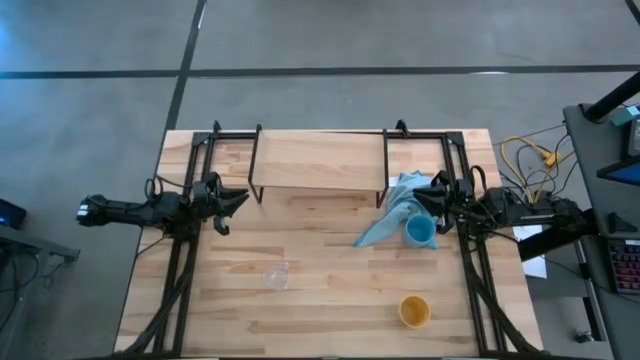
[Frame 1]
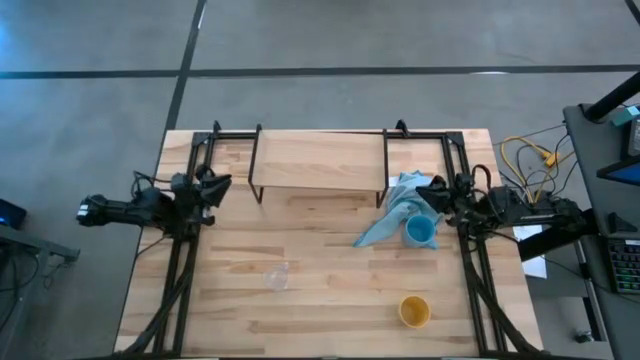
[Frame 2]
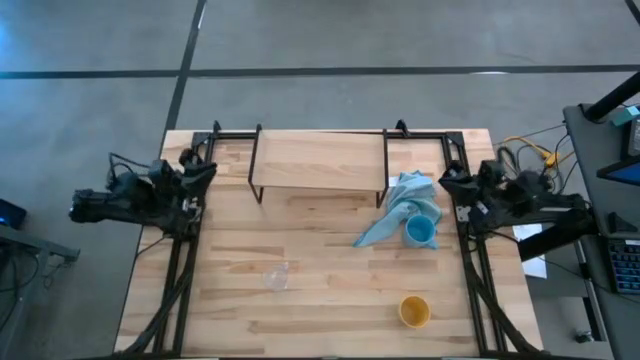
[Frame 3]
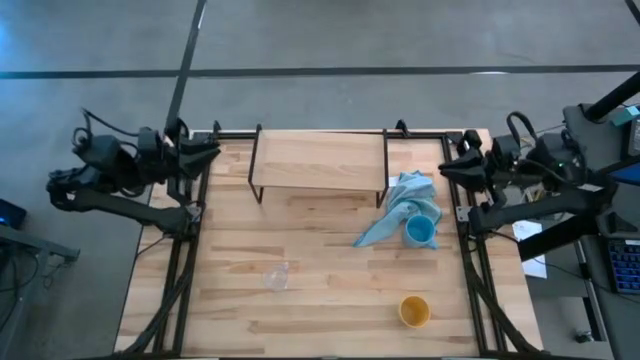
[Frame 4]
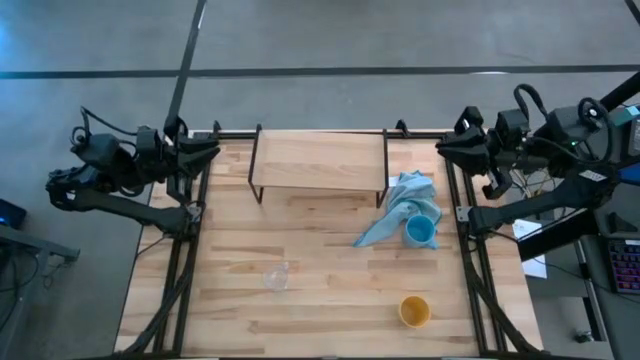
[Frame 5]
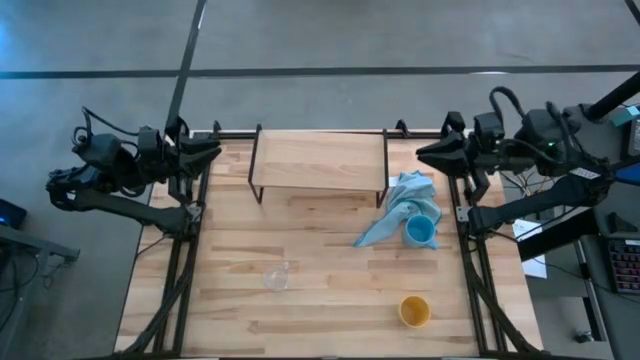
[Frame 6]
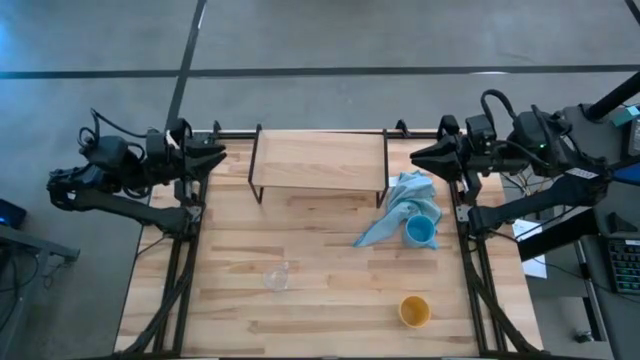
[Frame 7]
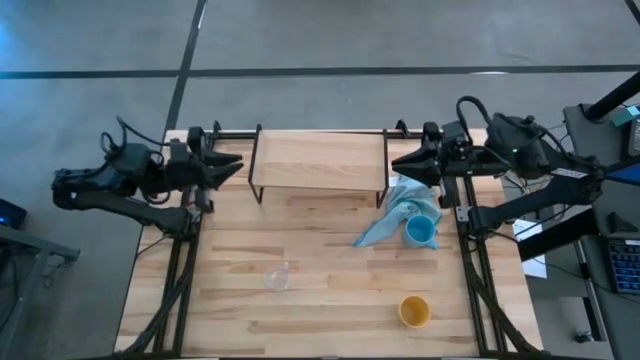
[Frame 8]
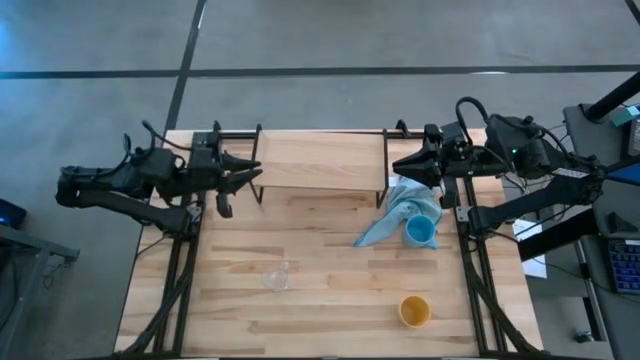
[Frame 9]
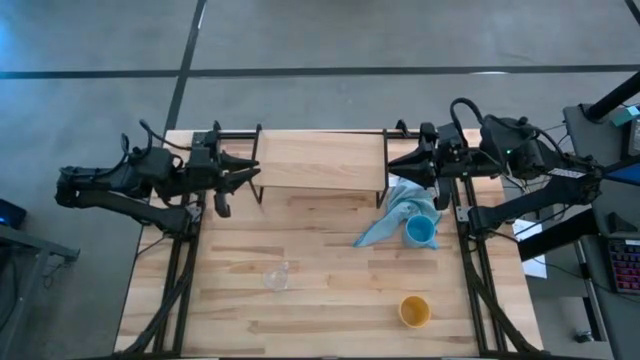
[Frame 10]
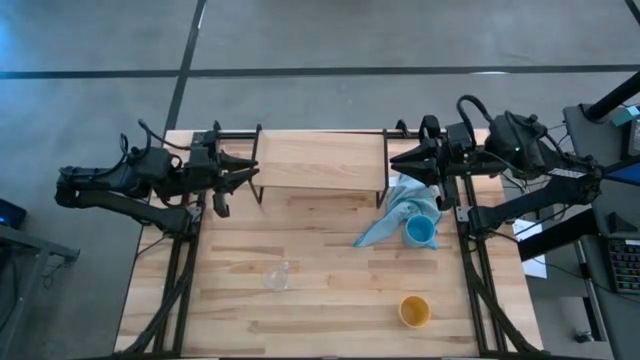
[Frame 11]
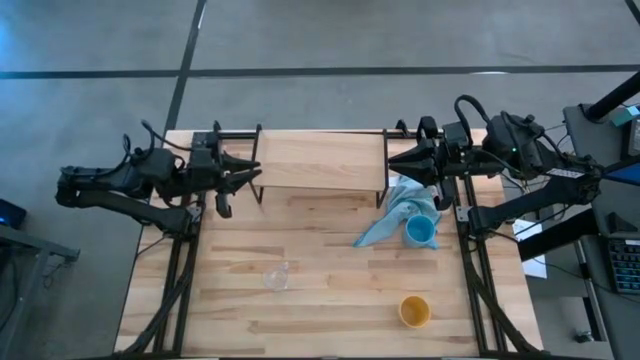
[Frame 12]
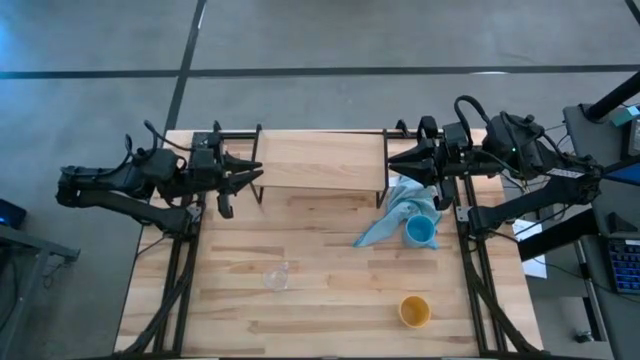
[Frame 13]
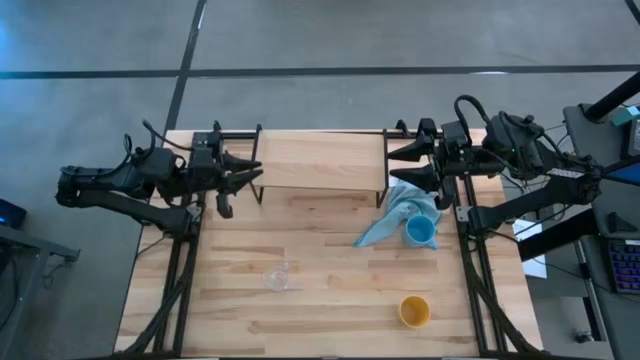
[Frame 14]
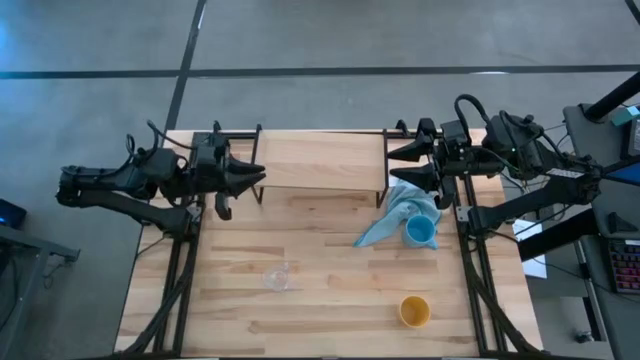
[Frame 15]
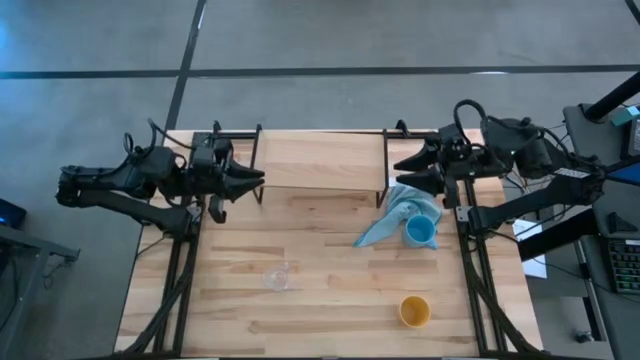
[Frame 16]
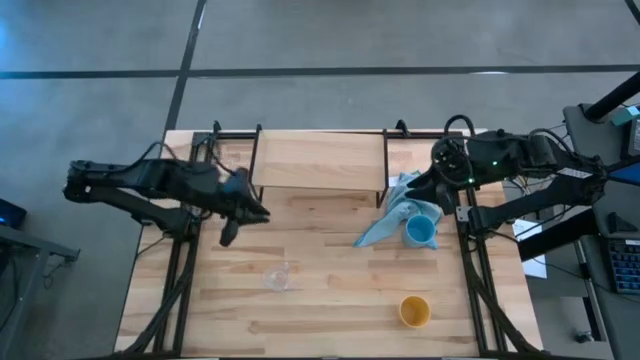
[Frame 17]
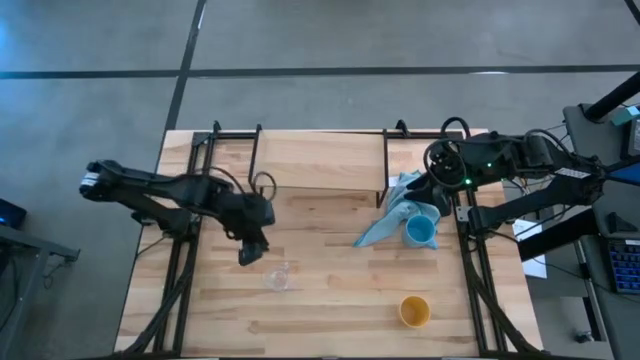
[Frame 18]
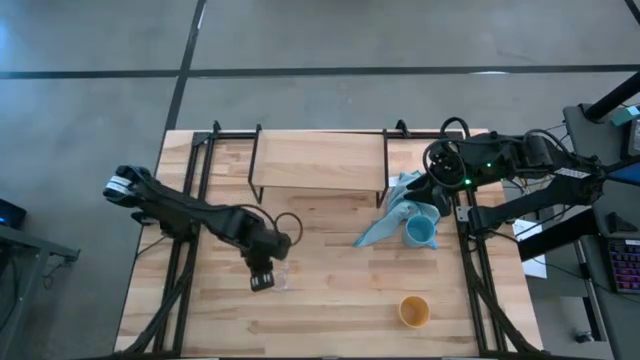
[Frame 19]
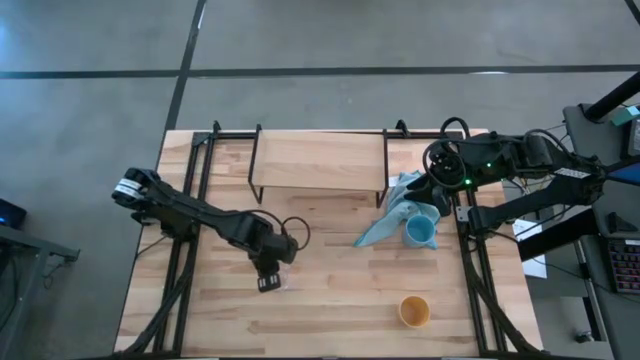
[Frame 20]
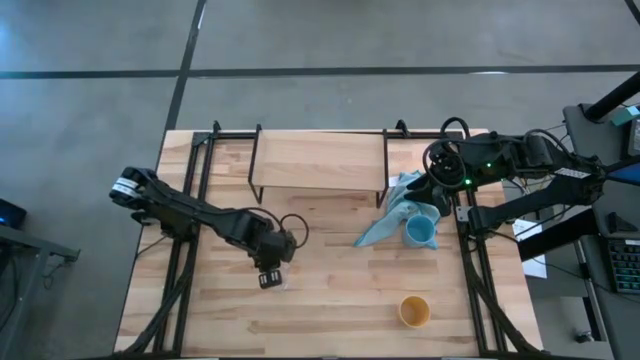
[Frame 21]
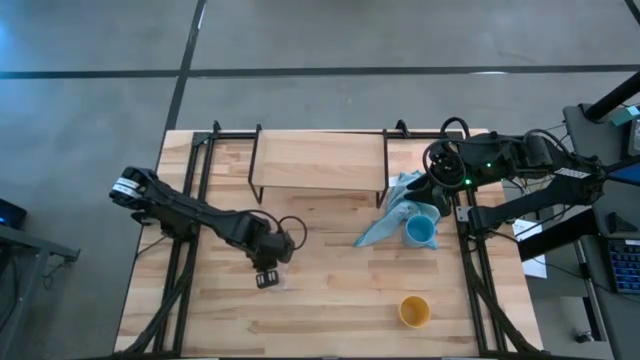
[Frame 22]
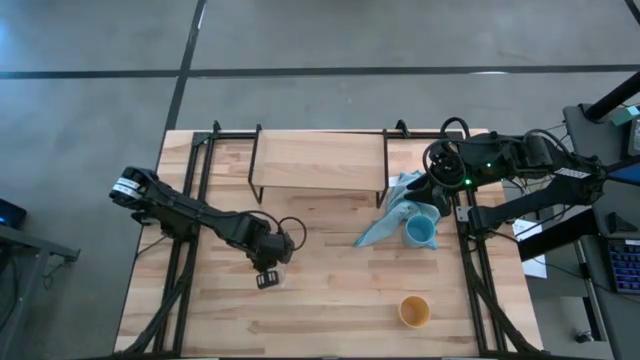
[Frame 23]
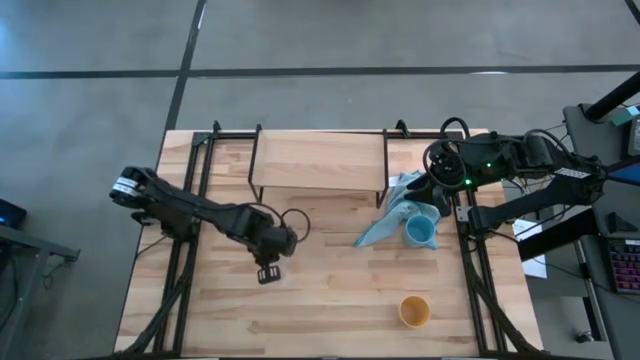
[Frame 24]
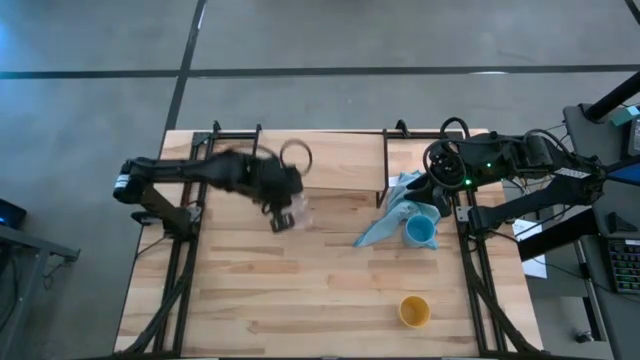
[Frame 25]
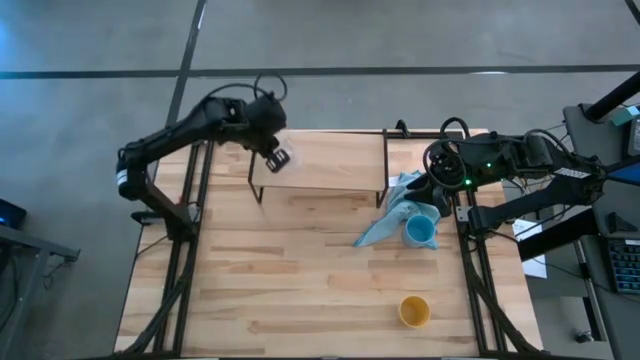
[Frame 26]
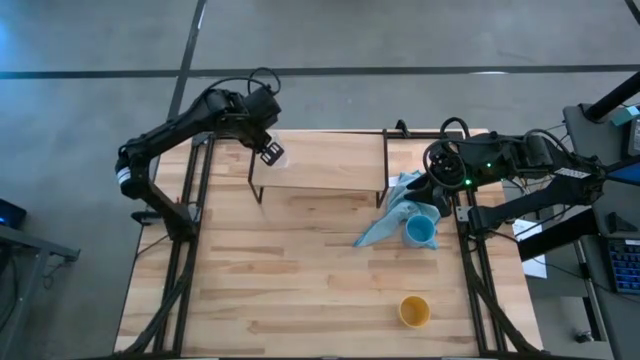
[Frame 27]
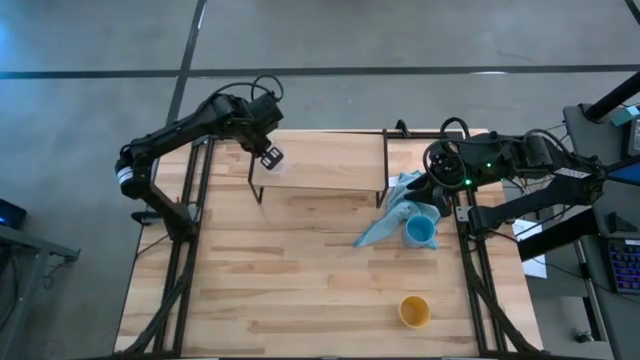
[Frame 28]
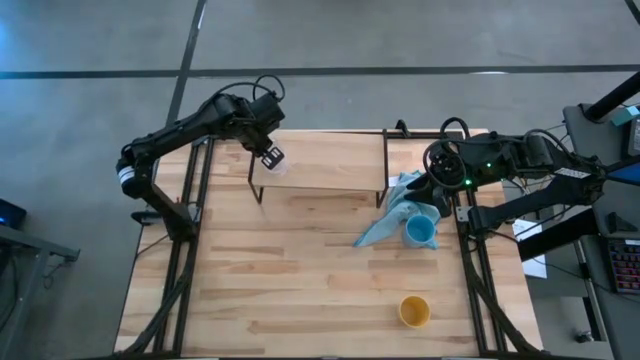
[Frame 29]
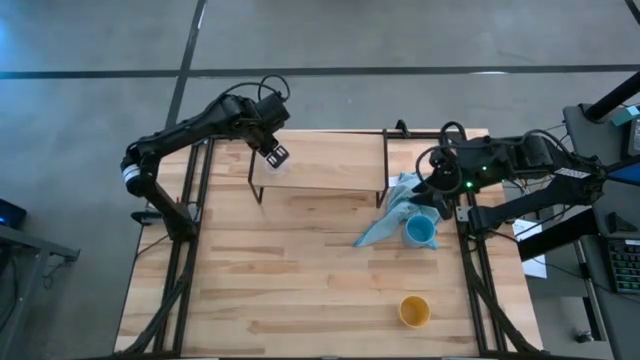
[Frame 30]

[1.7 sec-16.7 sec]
Task: Stack small to large cups/mugs on shelf
Put the transparent mug on the shelf

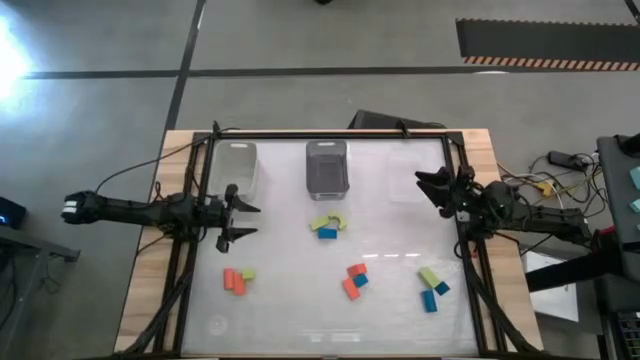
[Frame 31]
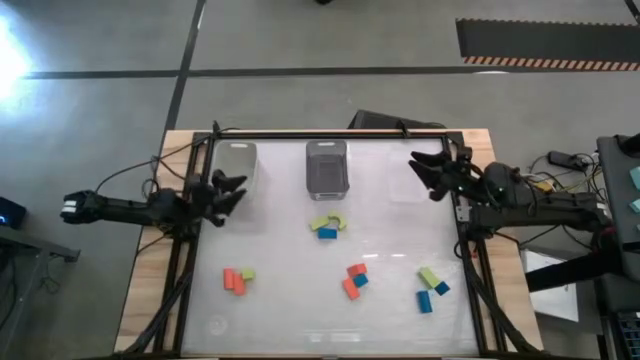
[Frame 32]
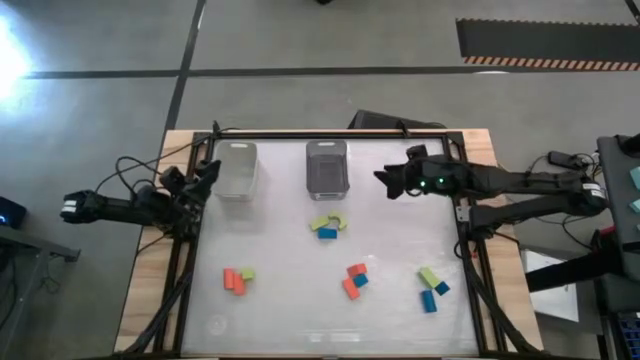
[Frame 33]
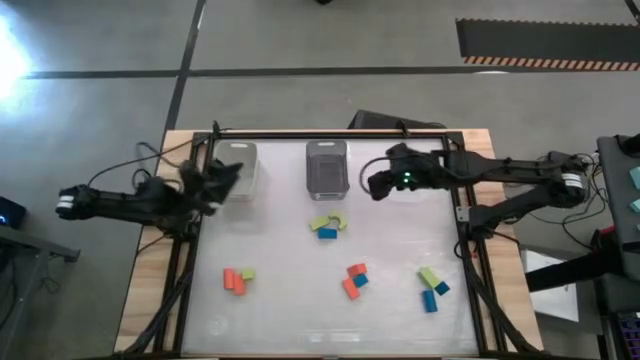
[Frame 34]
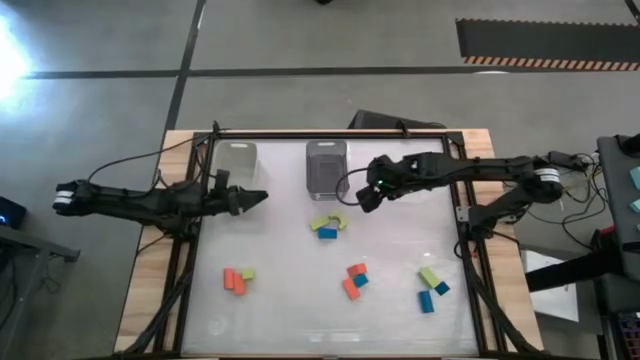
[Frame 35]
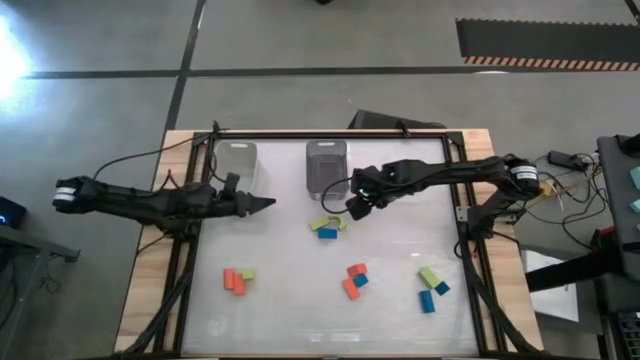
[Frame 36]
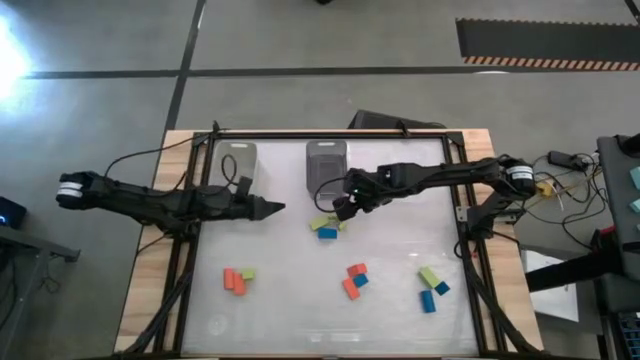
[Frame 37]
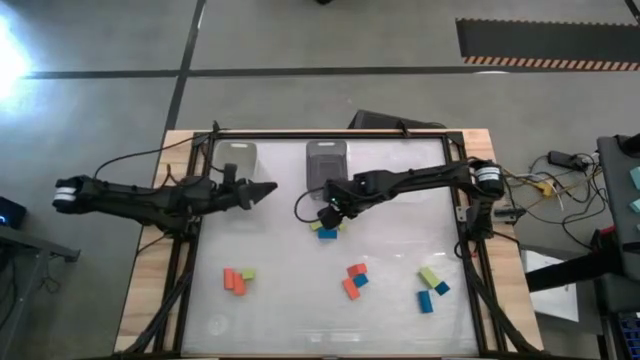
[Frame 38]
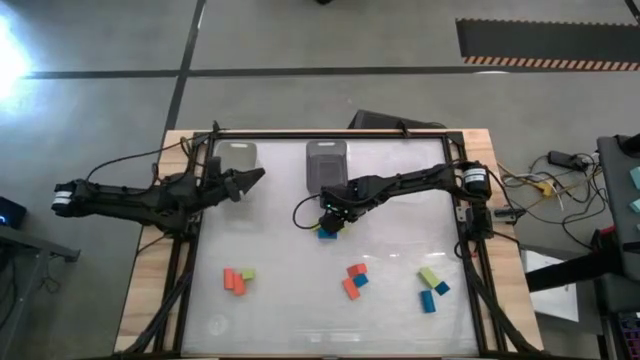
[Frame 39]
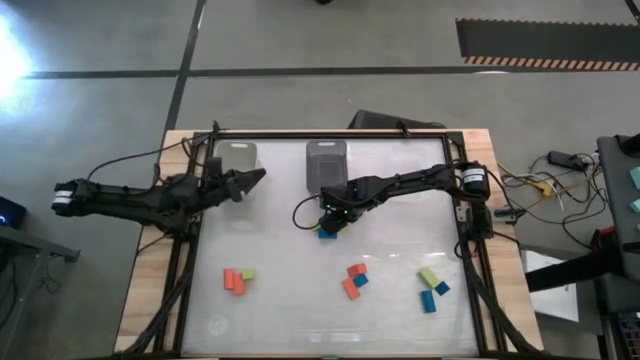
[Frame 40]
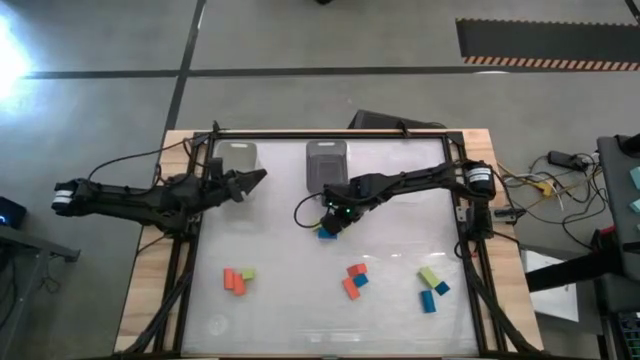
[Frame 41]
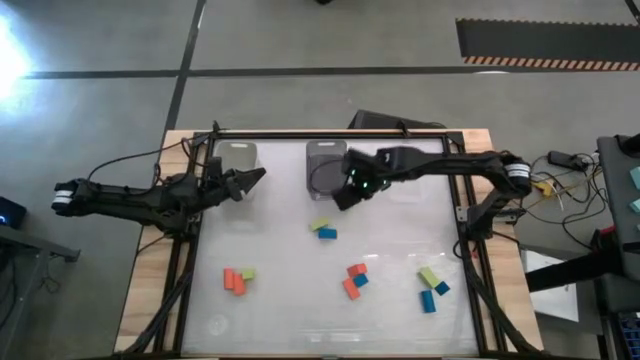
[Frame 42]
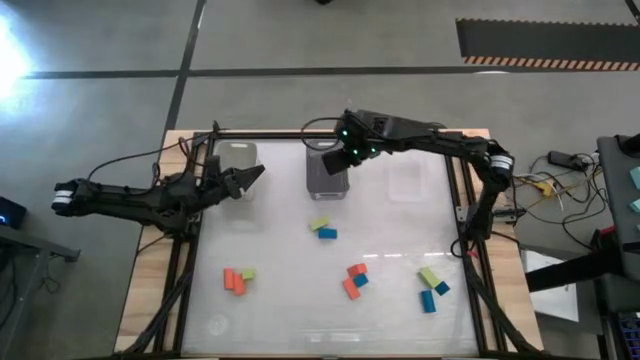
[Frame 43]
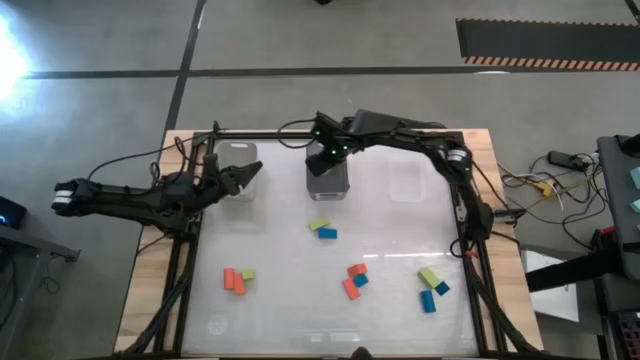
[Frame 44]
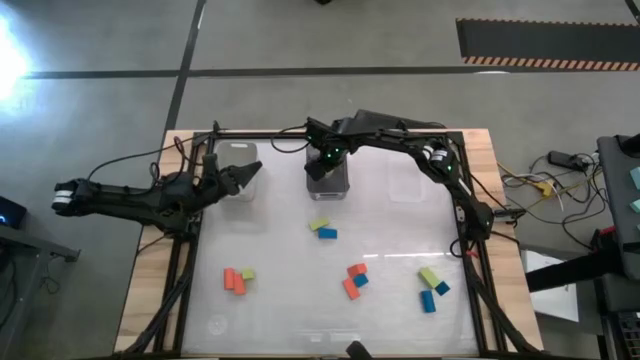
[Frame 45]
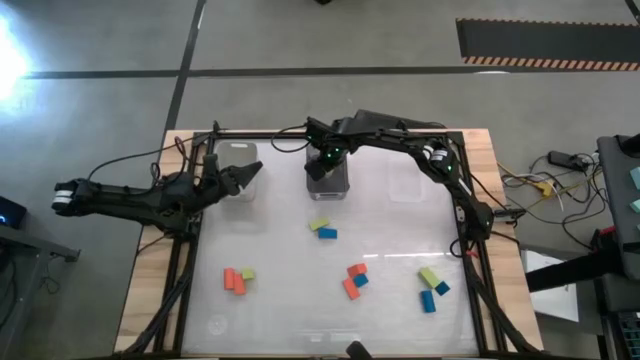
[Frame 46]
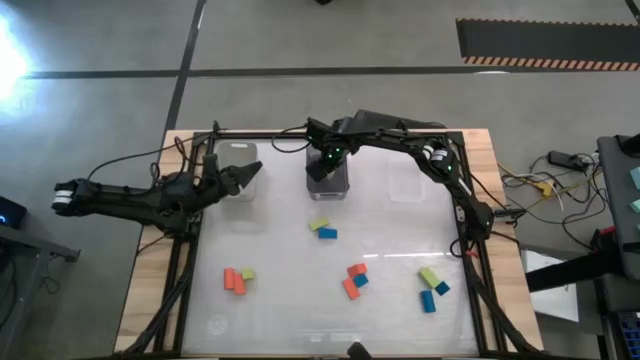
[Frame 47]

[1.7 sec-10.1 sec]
Task: Sort & place blocks by color
Put the green block into the black transparent bin
